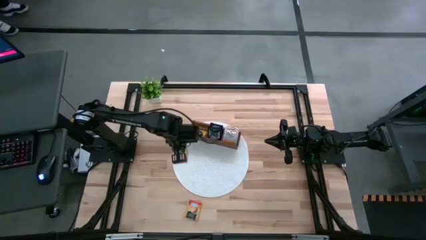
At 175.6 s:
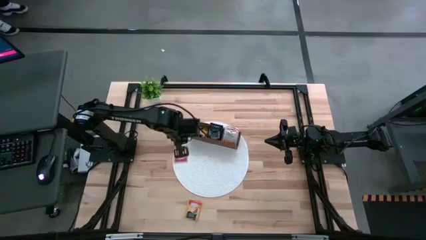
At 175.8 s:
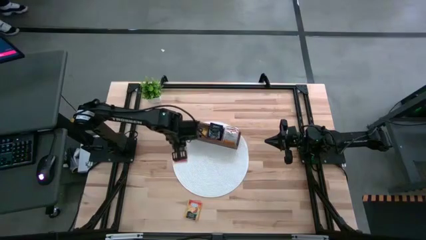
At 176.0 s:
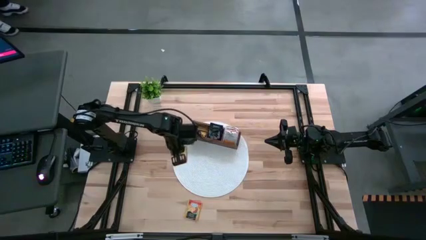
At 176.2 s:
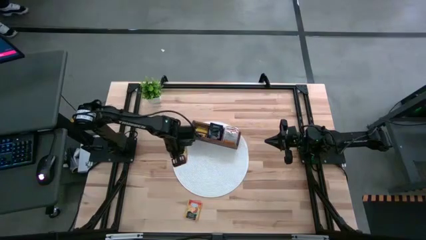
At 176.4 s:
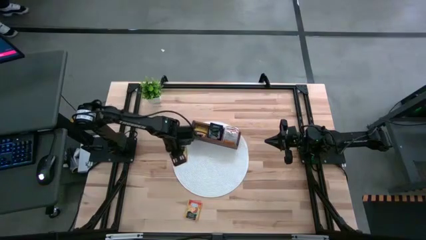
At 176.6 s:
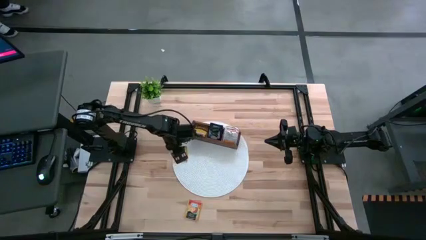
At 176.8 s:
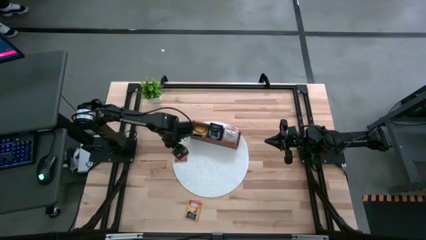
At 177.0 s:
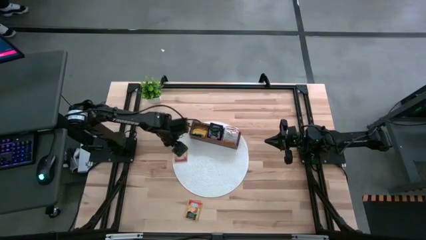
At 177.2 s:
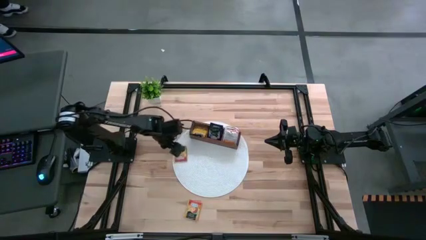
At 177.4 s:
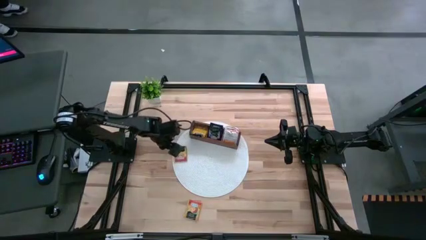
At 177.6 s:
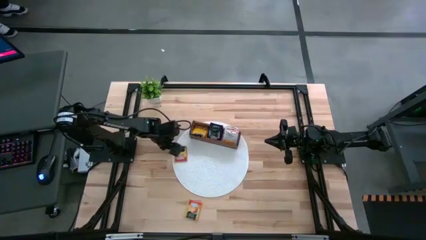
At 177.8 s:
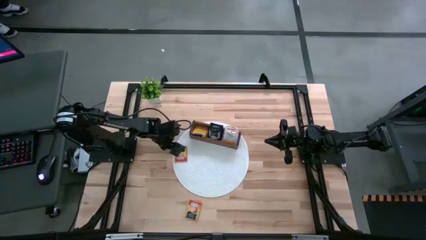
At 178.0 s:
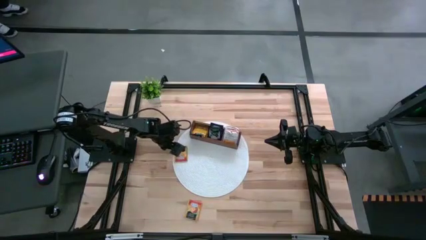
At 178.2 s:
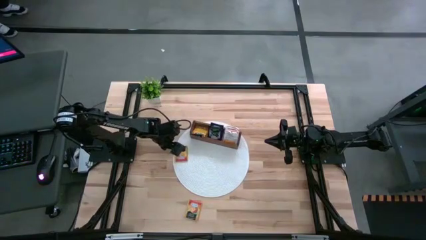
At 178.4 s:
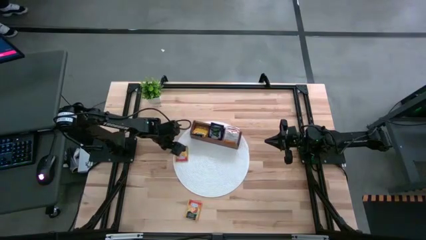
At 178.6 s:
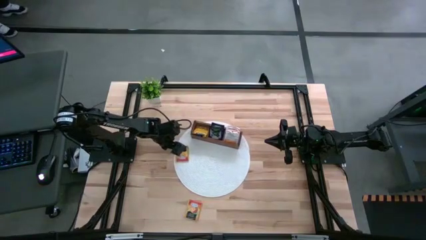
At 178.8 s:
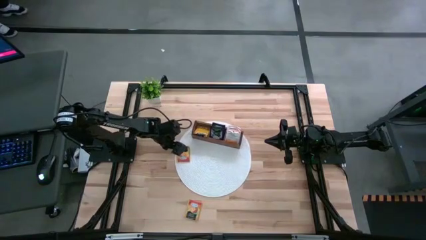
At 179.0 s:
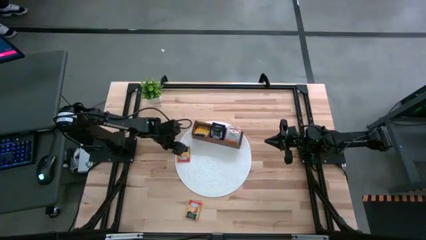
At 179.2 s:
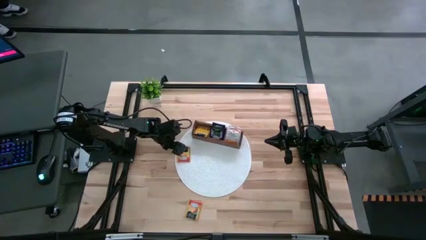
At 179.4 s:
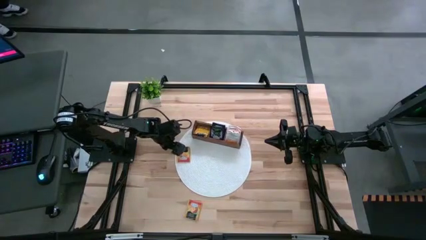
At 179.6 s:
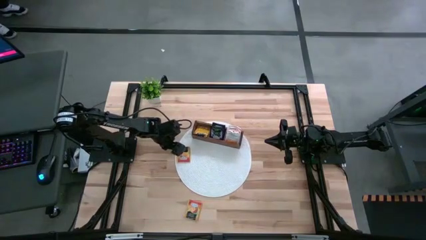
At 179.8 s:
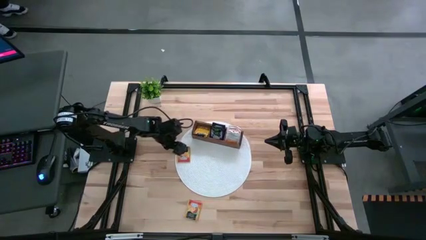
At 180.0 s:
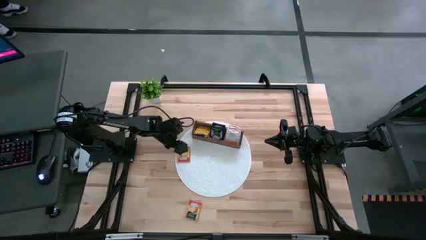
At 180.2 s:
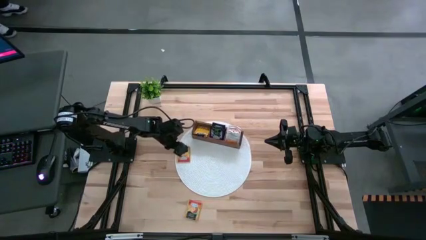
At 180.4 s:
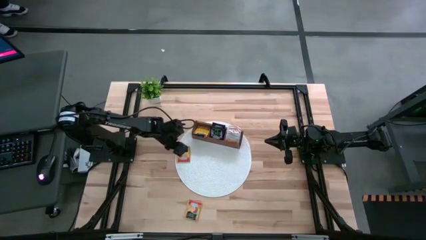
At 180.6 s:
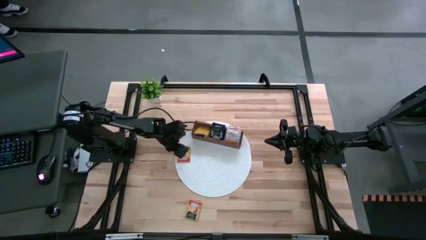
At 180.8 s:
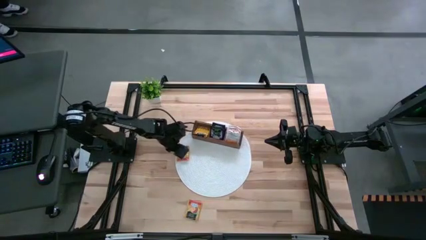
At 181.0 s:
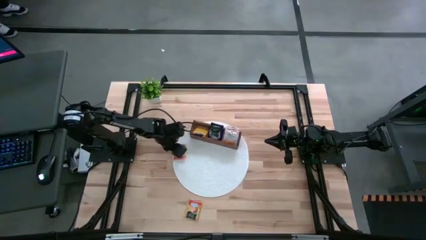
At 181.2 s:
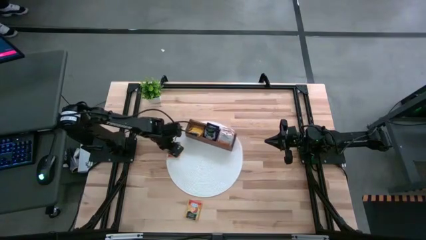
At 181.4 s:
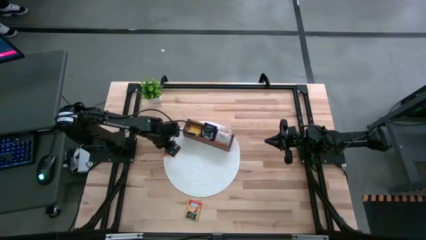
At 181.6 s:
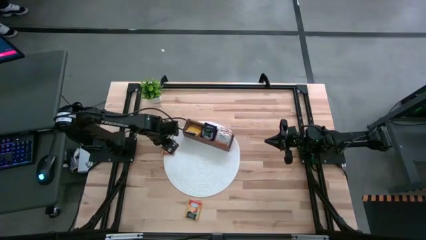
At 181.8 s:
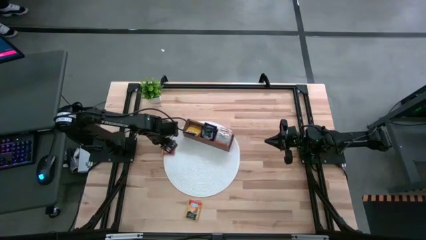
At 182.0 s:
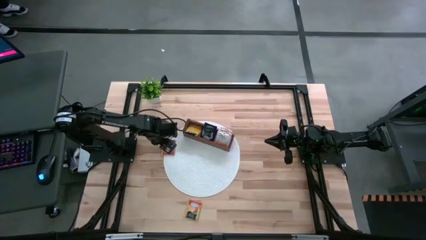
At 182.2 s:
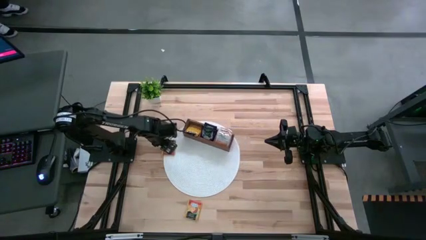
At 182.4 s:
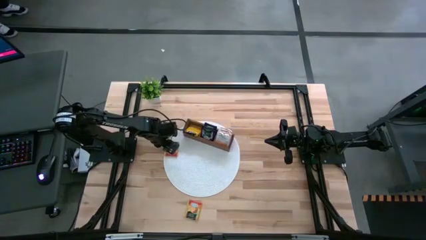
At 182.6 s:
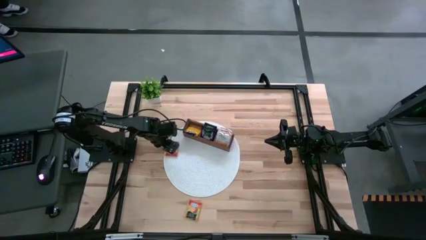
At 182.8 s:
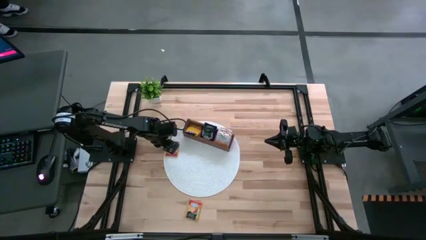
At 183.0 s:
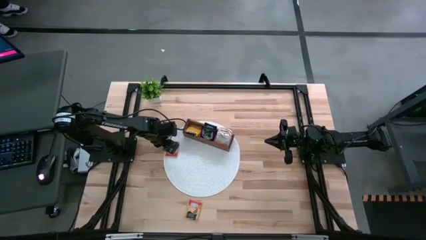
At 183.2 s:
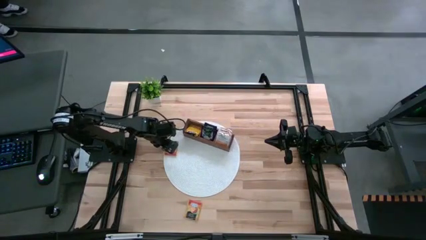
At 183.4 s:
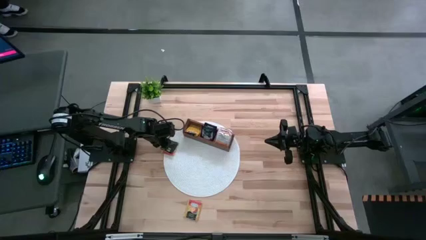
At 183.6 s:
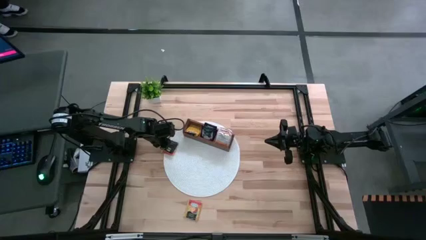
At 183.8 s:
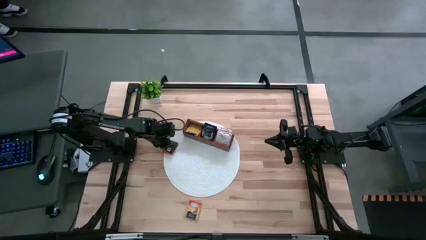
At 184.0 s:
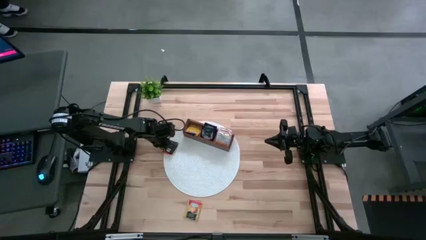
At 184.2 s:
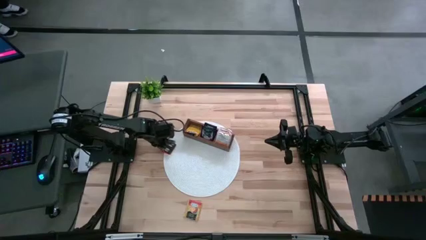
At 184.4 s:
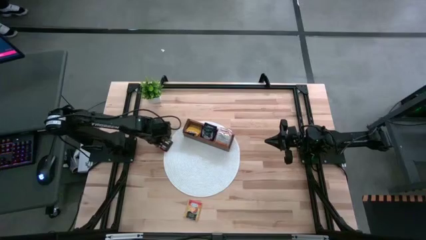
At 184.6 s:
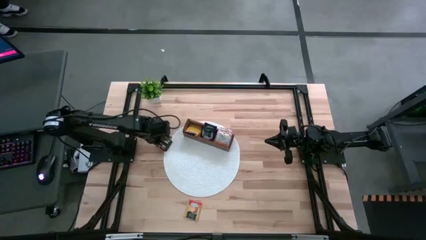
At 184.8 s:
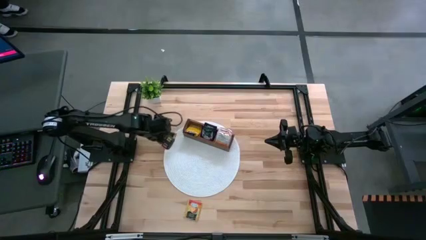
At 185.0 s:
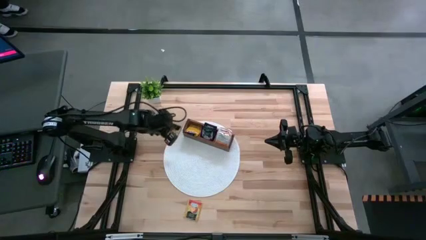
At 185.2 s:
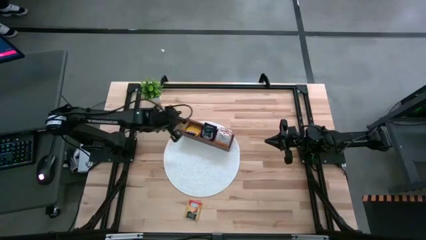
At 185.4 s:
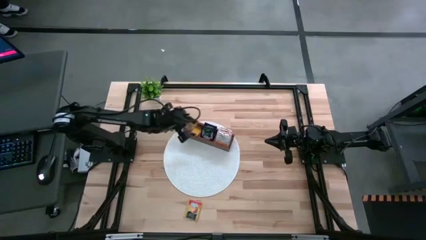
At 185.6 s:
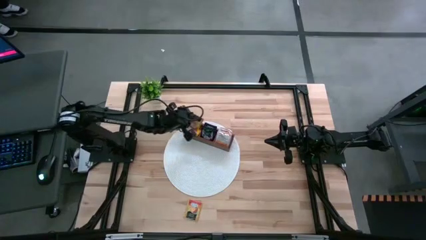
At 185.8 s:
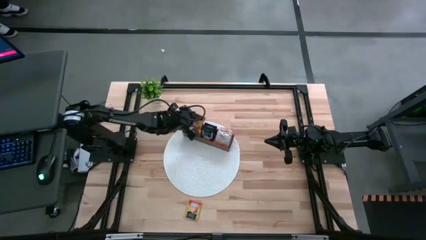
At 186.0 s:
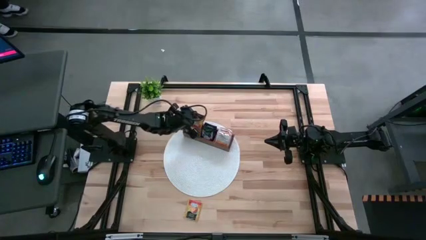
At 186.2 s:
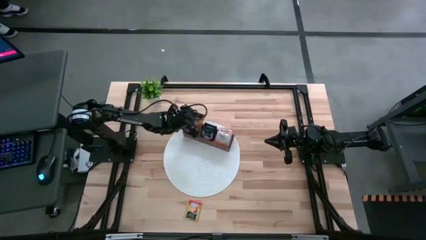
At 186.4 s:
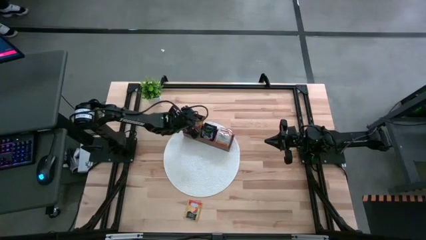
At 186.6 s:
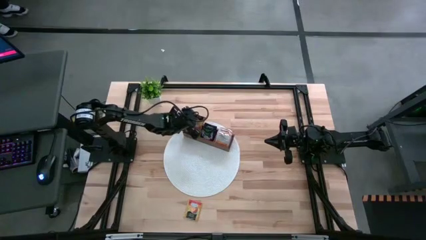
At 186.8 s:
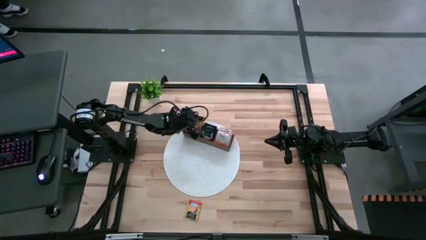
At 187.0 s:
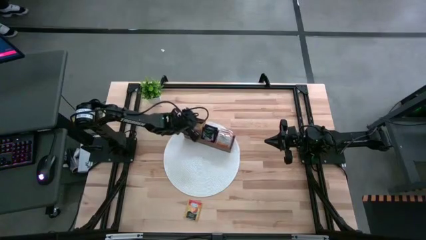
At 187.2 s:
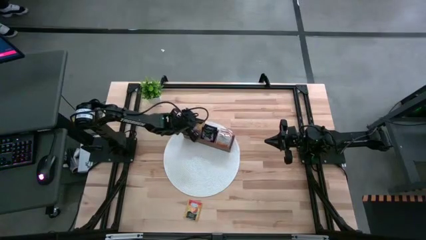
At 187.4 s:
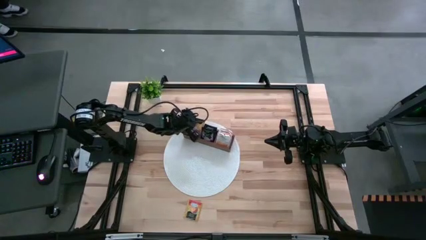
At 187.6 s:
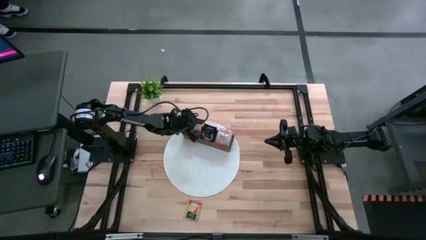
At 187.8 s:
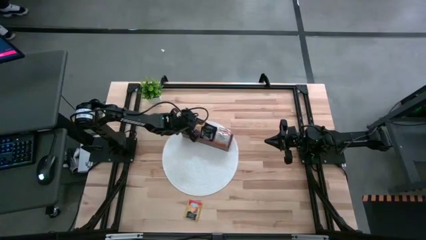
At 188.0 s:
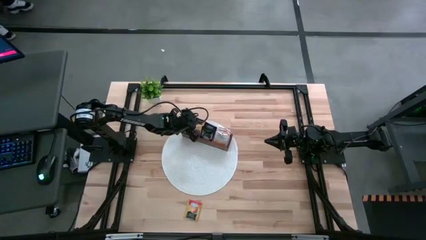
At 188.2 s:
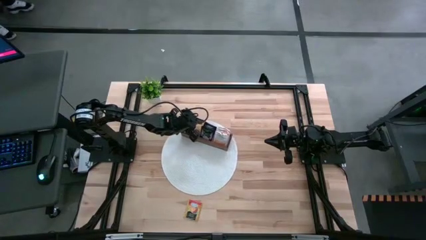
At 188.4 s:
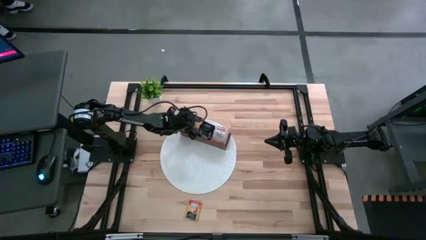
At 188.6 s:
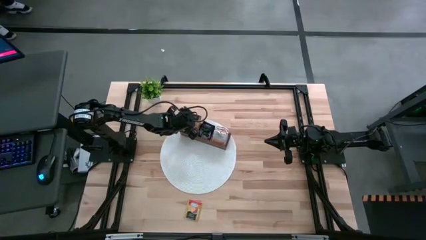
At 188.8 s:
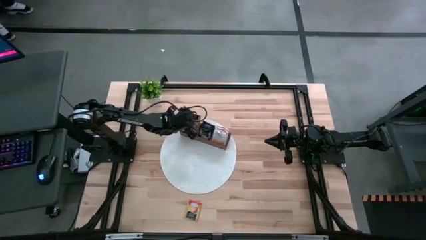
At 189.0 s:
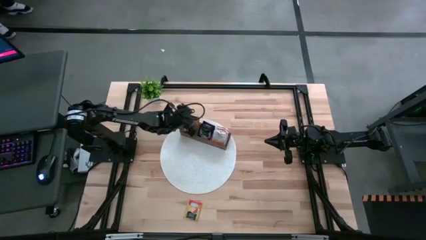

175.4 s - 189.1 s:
Task: Pick & Place Tea
Put the orange tea bag into the left section of the wooden organizer
